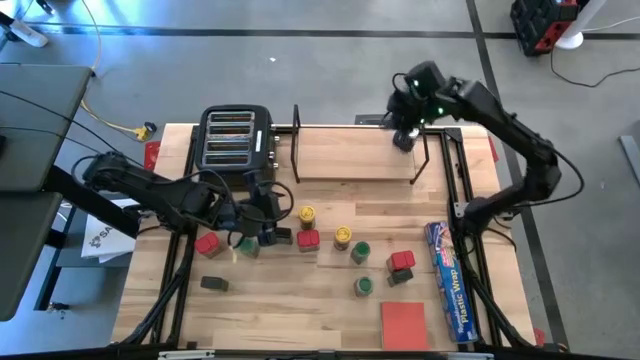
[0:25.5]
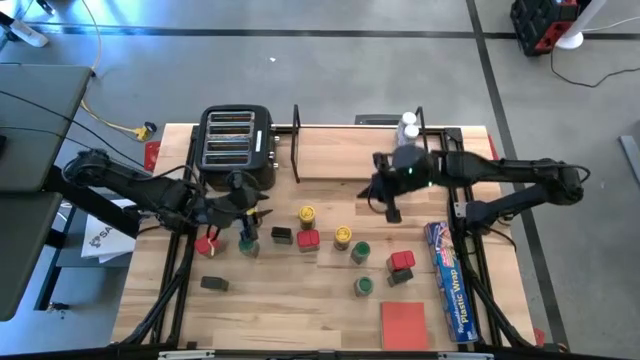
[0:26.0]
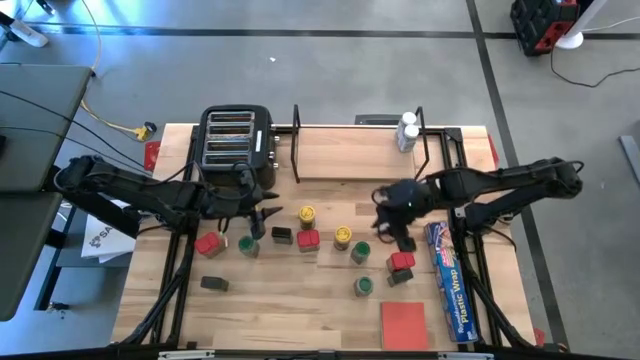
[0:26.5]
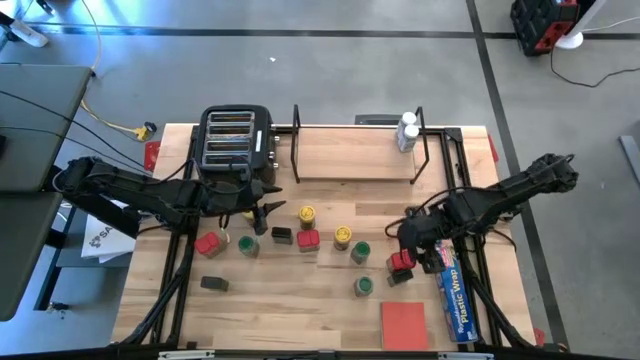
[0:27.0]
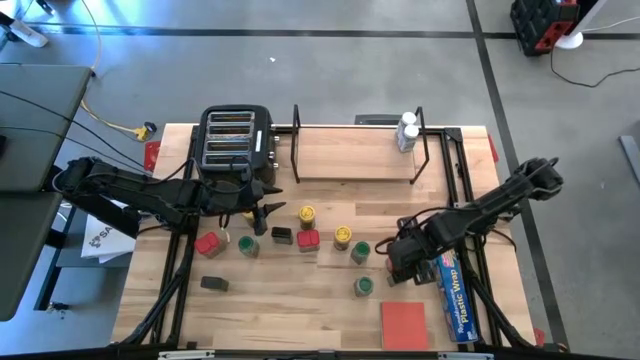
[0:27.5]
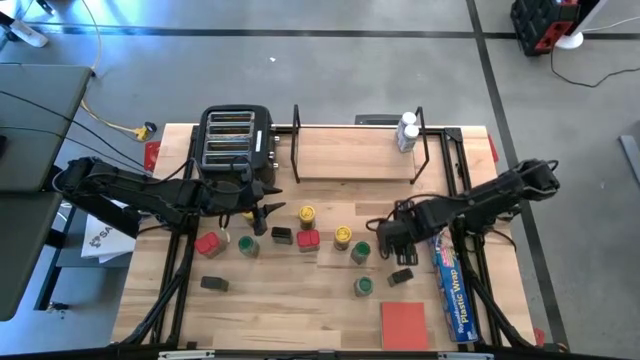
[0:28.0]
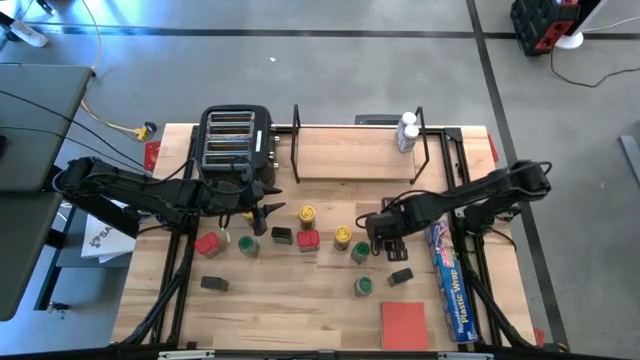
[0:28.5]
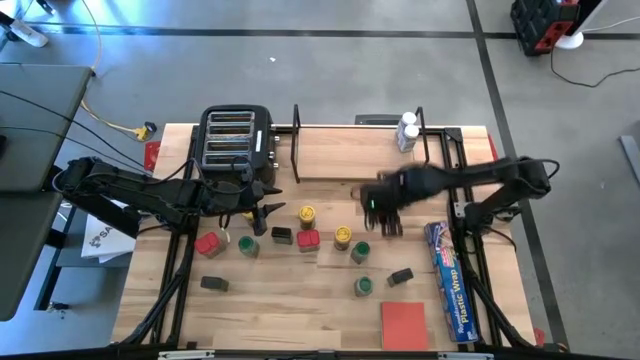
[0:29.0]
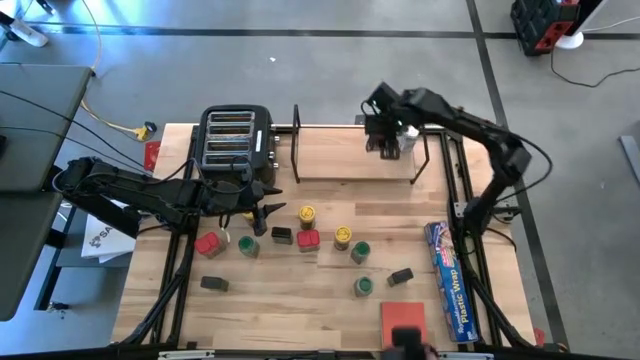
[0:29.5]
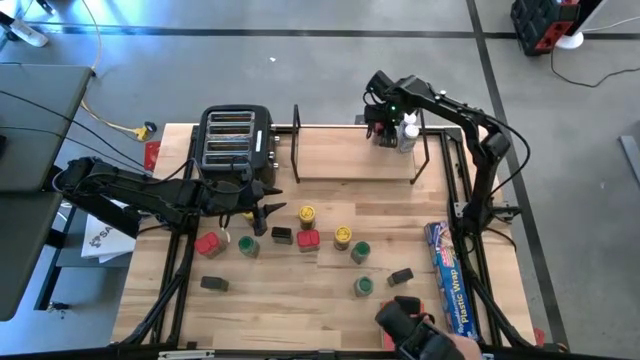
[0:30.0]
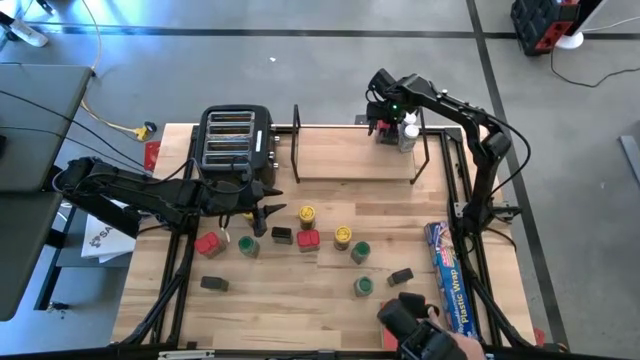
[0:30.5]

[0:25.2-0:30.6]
Task: Shelf spices
Put the bottom right red seasoning can on the shelf

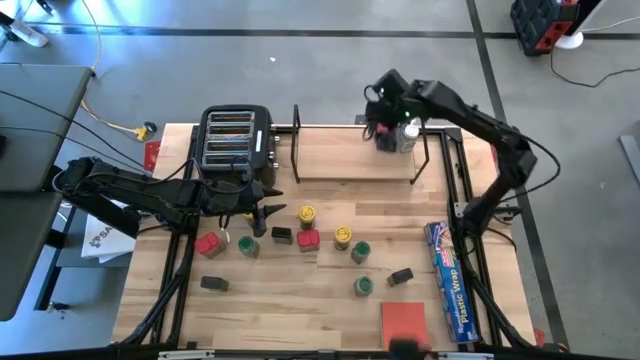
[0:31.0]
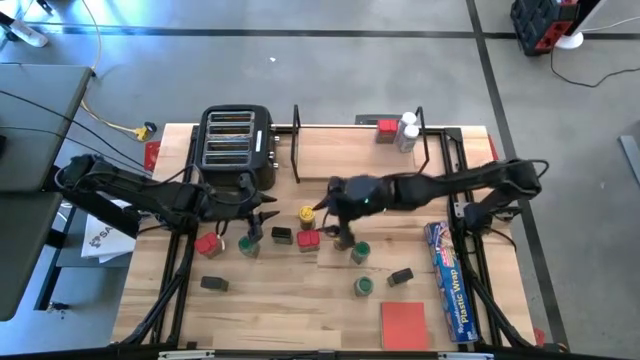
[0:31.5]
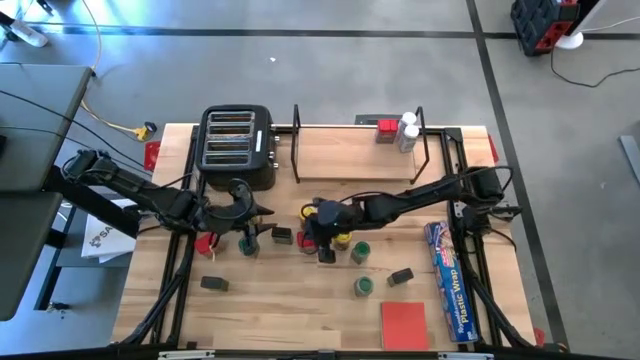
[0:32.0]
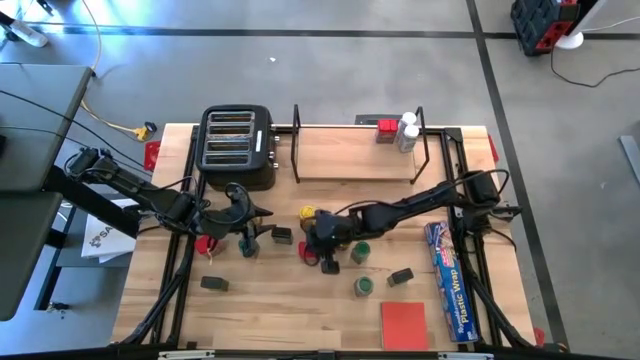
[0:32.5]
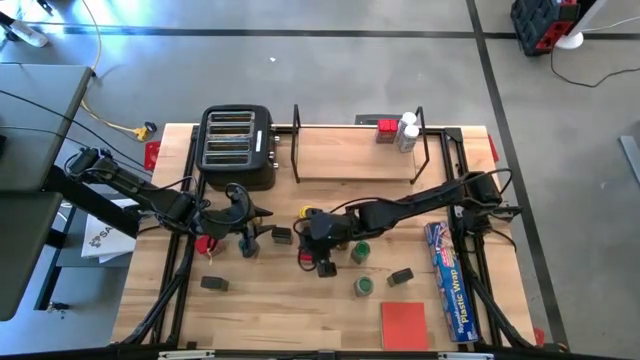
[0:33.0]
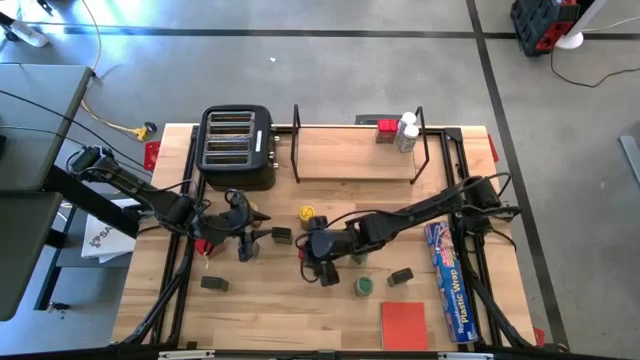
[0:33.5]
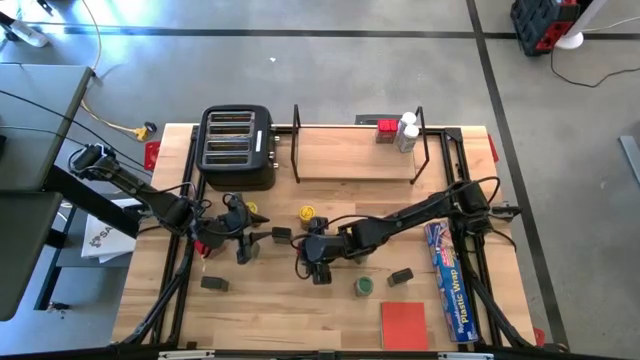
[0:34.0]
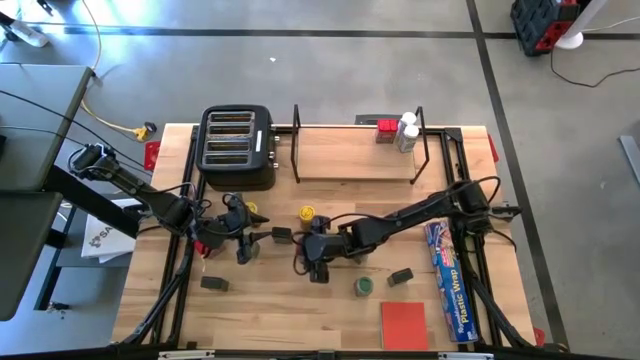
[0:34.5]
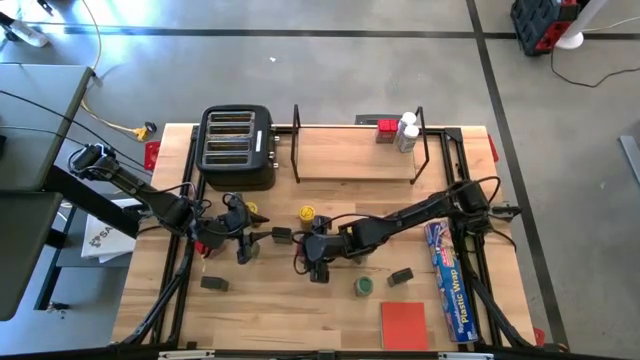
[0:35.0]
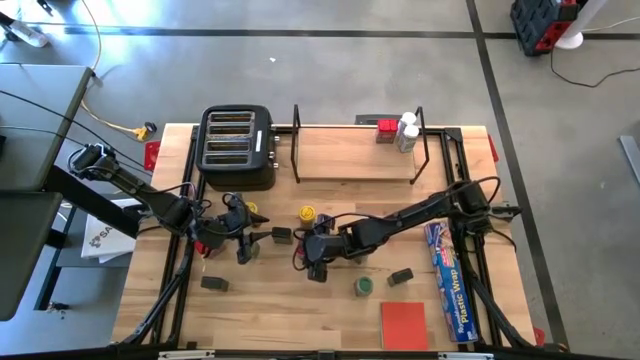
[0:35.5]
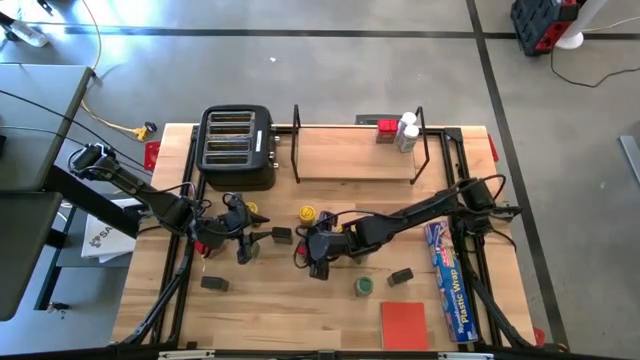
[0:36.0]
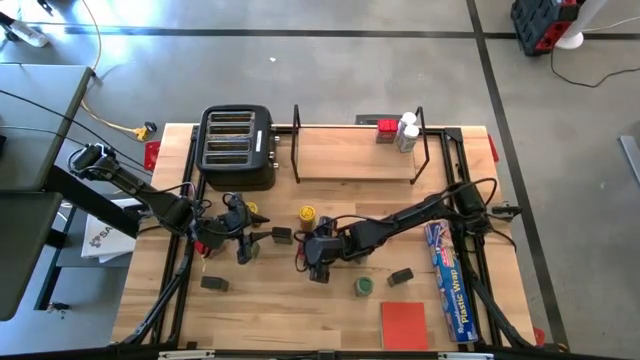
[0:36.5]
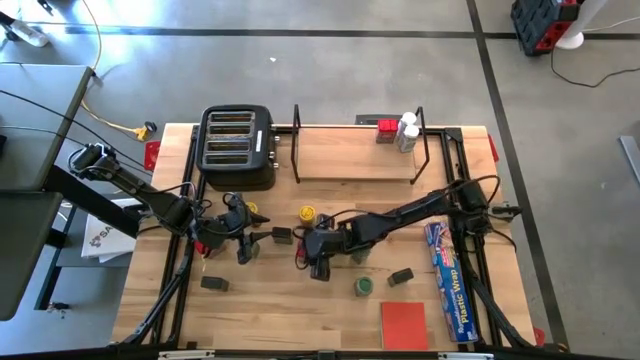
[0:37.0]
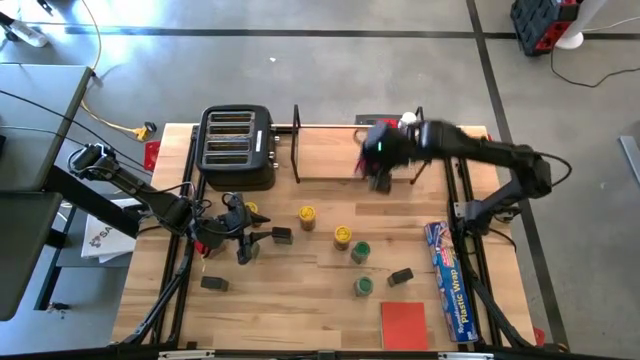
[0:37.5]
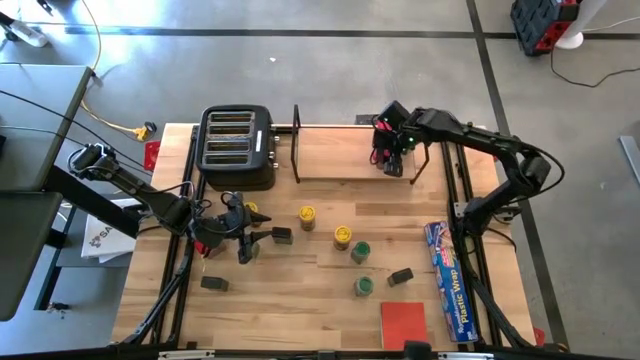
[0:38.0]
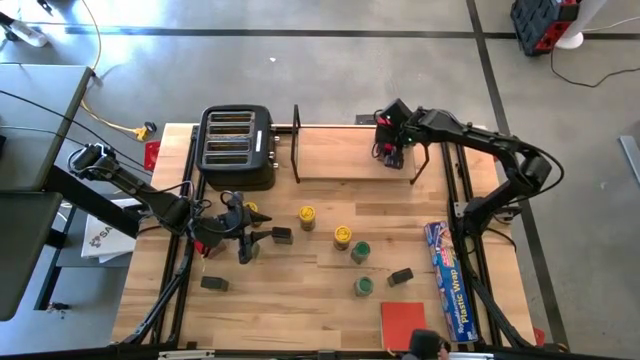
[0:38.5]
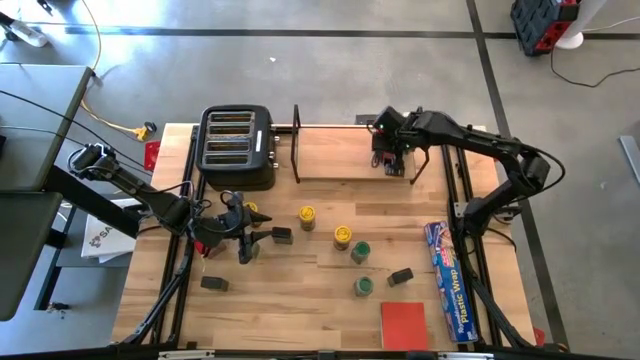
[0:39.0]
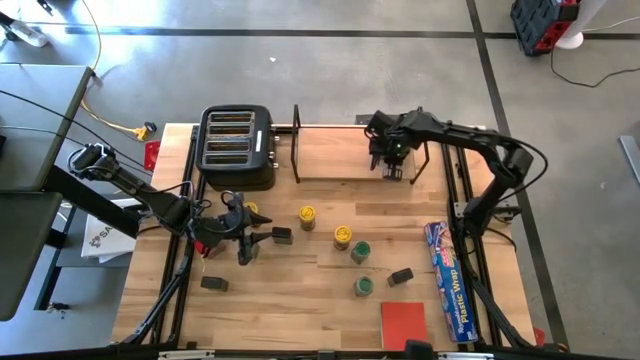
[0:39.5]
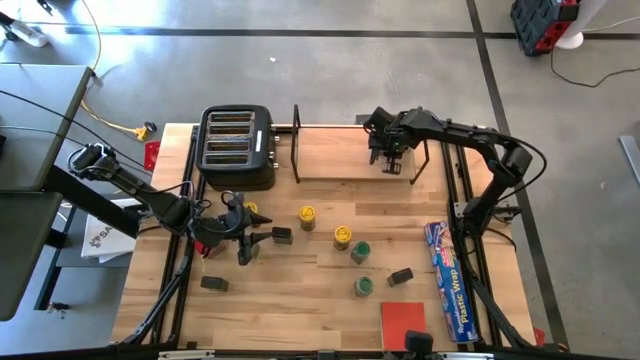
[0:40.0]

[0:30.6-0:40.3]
Put the right red seasoning can on the shelf aligned with the other red seasoning can

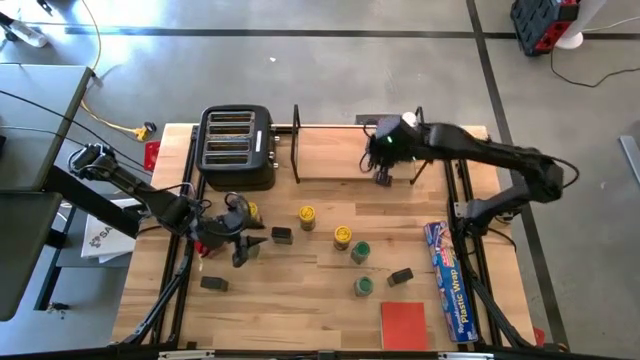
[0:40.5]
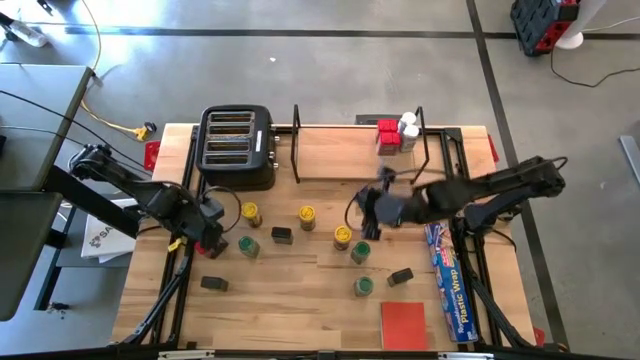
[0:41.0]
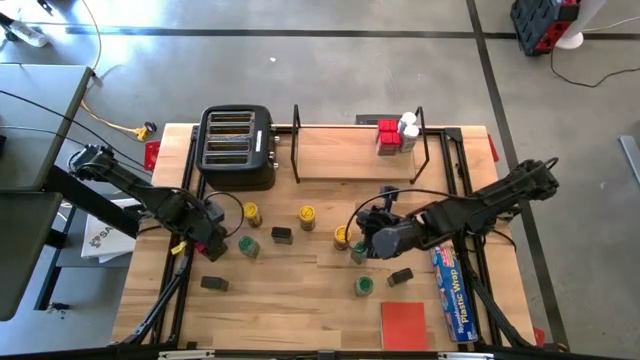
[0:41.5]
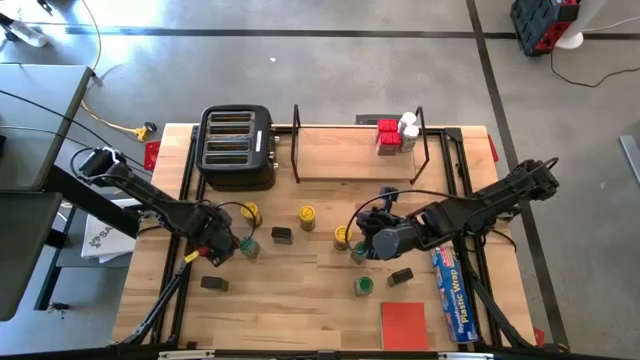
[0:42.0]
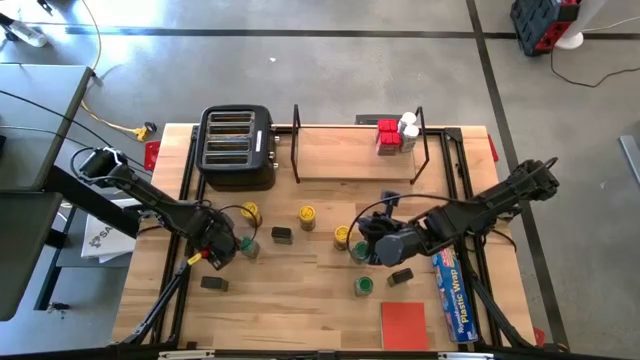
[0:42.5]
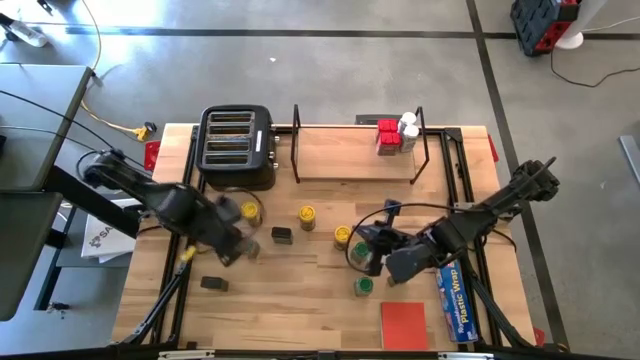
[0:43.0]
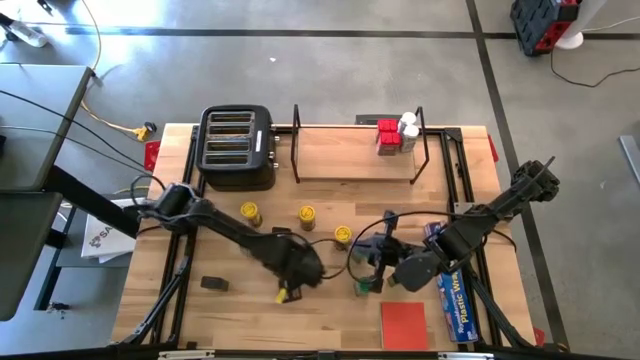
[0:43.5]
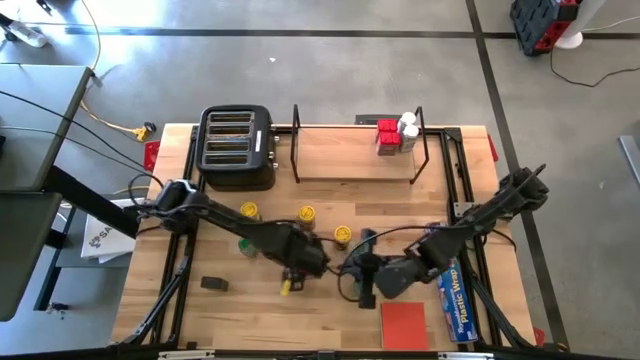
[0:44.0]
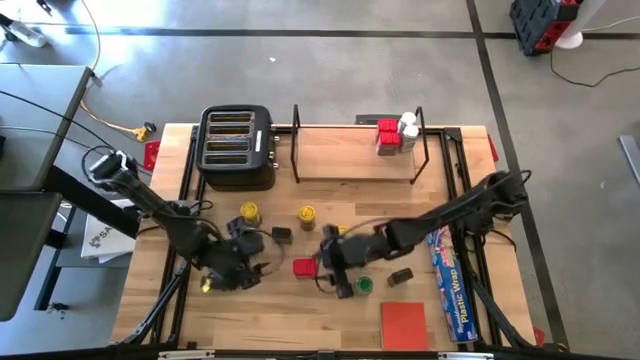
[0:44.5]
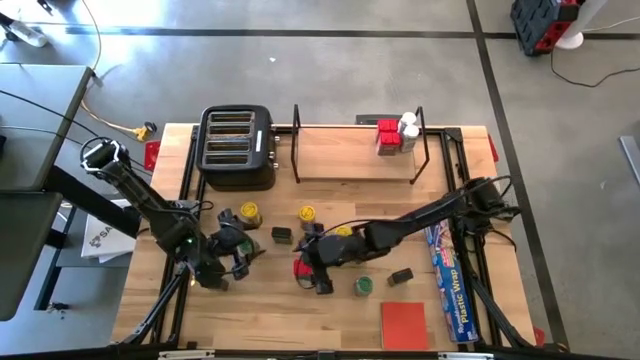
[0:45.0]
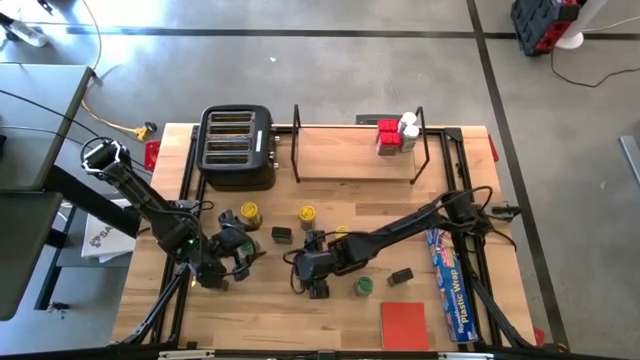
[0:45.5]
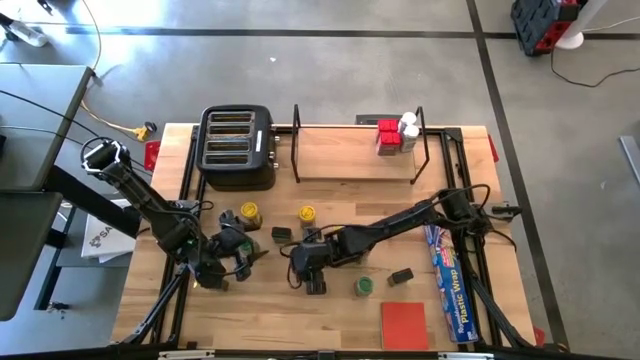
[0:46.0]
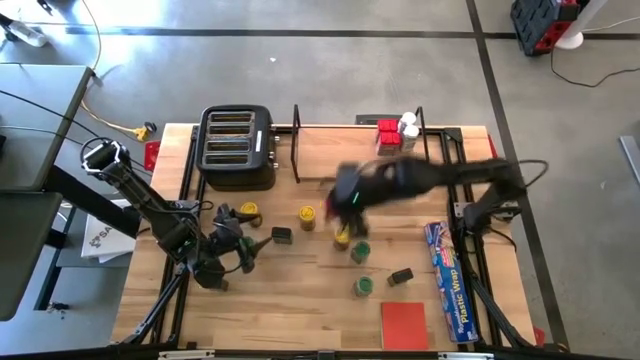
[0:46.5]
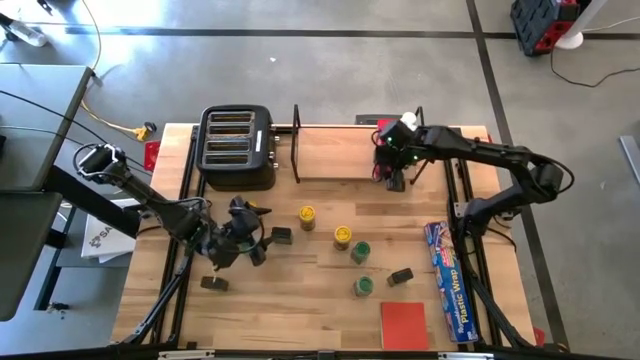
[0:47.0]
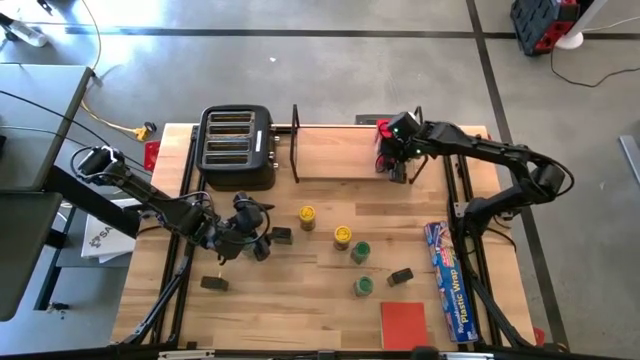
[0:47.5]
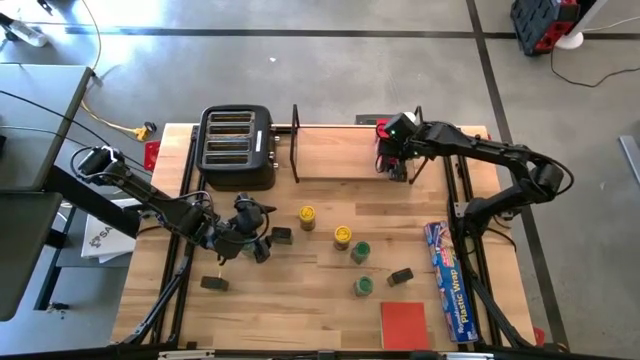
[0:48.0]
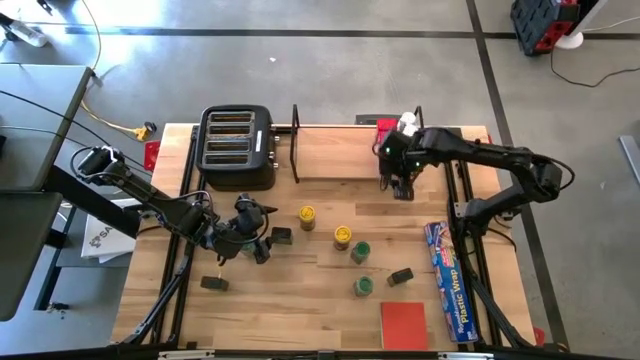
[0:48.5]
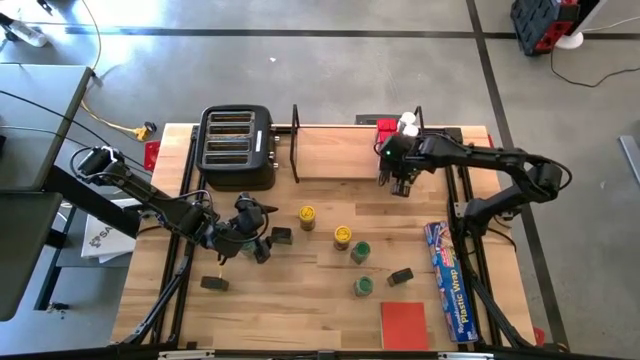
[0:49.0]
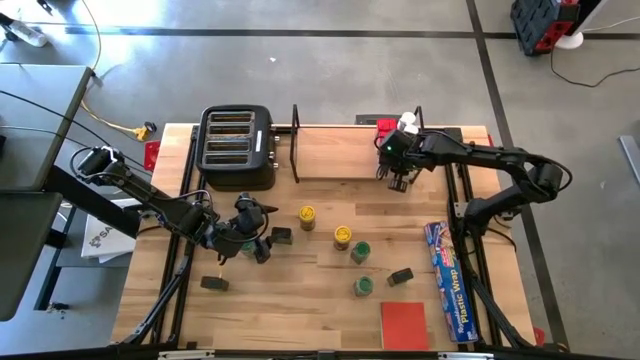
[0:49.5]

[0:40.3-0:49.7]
Put the right red seasoning can on the shelf aligned with the other red seasoning cans
